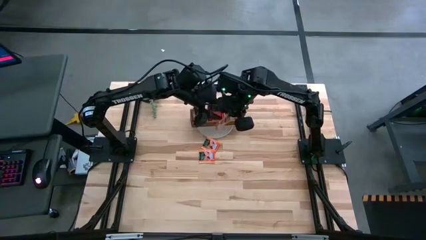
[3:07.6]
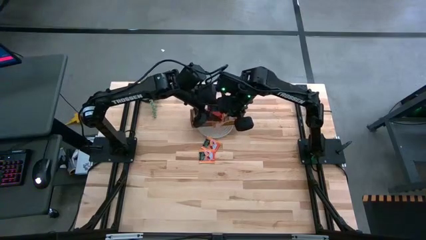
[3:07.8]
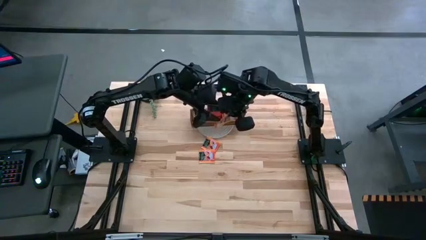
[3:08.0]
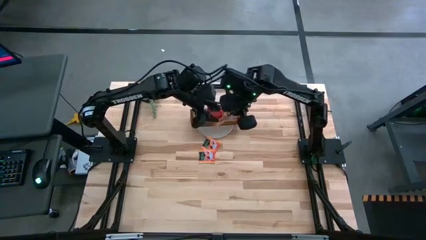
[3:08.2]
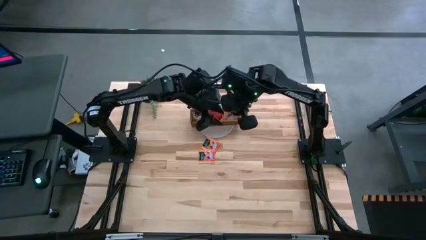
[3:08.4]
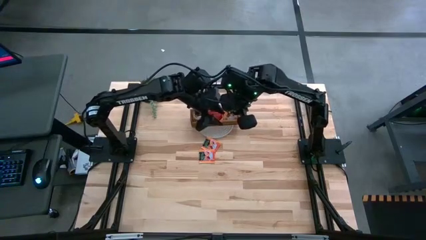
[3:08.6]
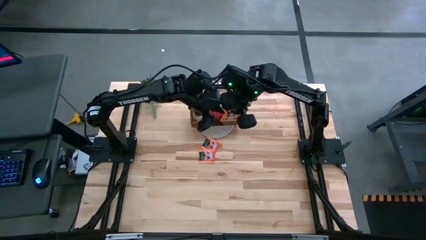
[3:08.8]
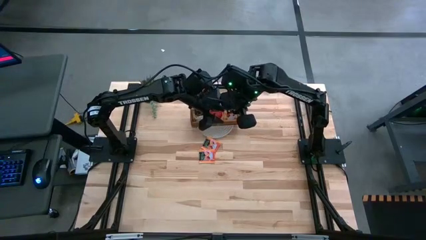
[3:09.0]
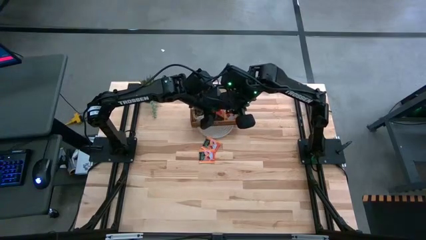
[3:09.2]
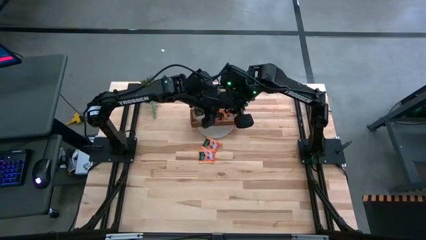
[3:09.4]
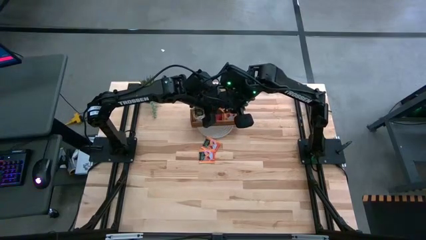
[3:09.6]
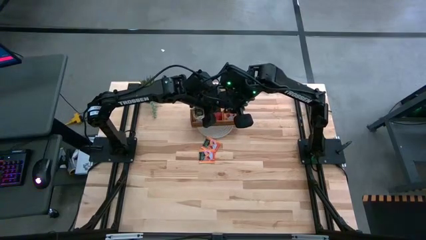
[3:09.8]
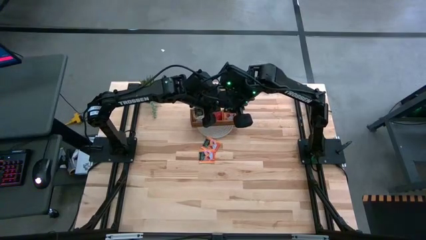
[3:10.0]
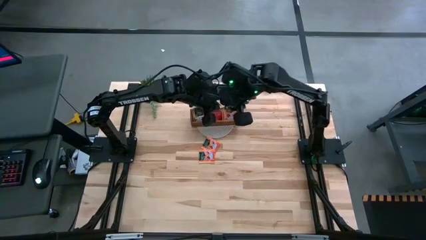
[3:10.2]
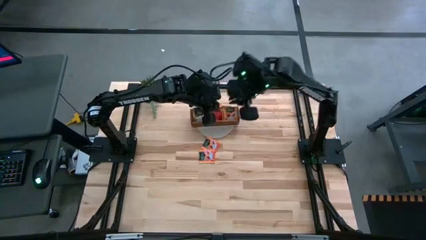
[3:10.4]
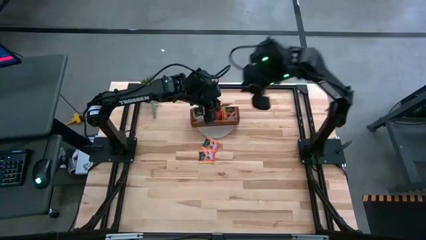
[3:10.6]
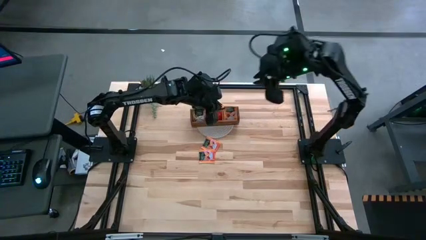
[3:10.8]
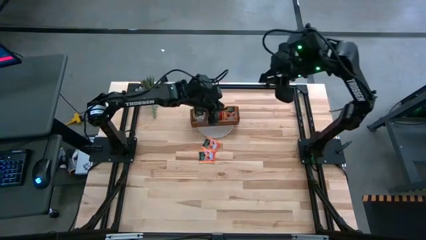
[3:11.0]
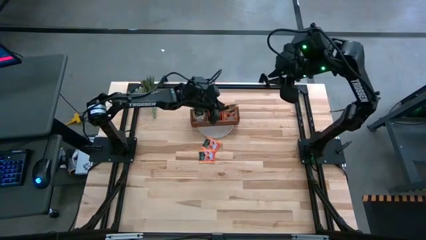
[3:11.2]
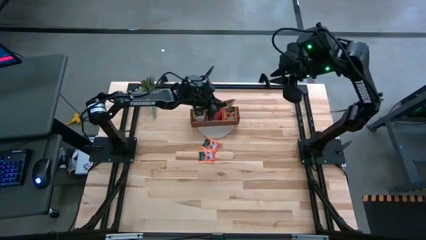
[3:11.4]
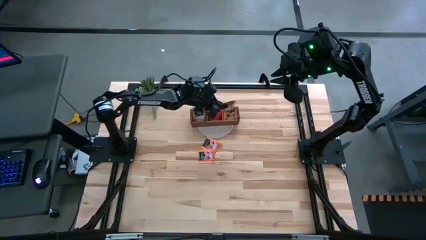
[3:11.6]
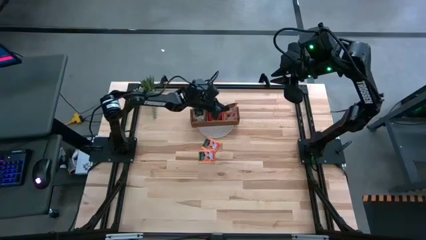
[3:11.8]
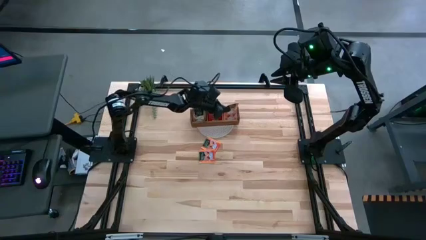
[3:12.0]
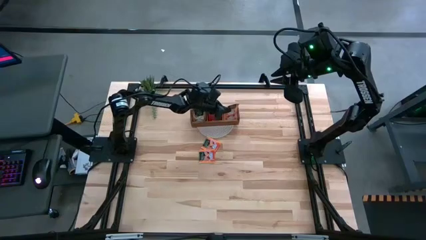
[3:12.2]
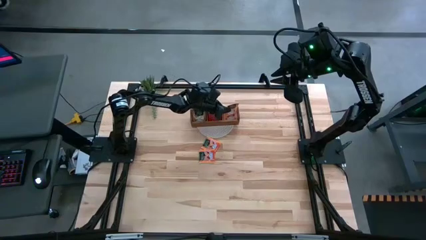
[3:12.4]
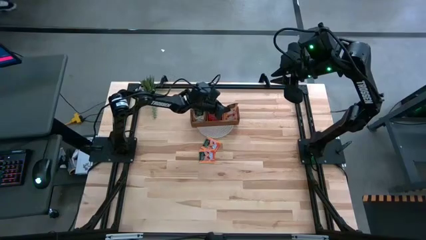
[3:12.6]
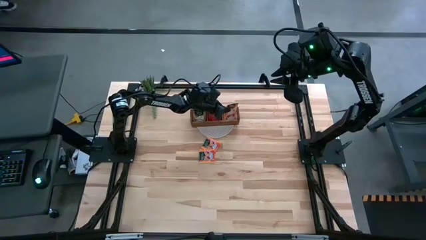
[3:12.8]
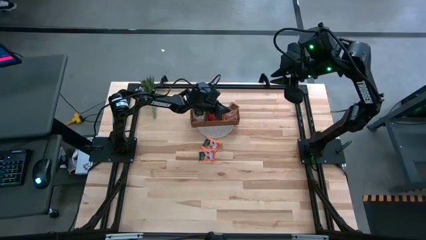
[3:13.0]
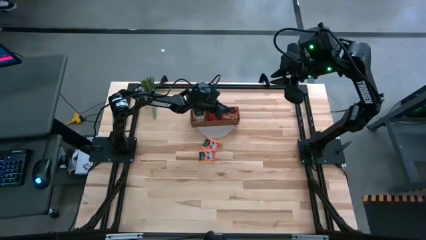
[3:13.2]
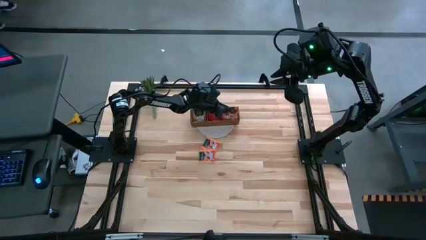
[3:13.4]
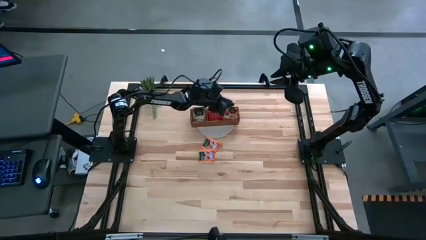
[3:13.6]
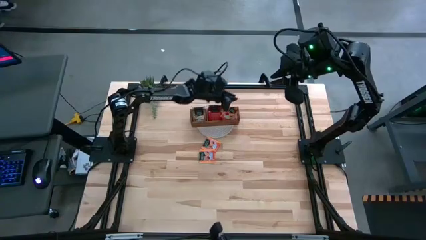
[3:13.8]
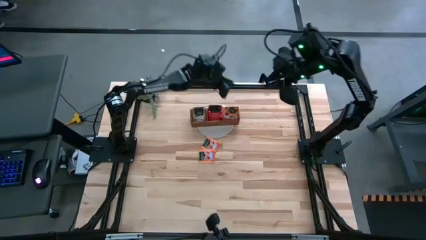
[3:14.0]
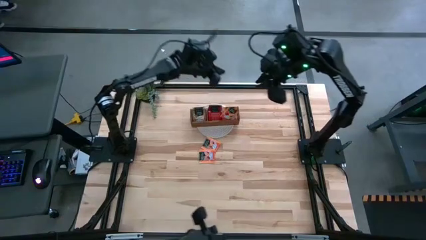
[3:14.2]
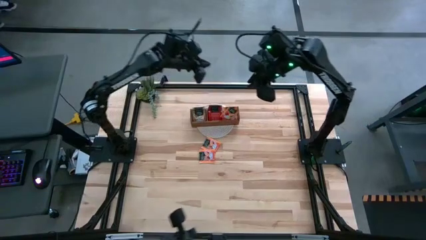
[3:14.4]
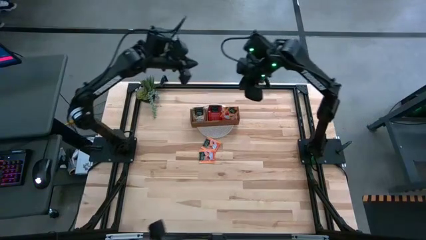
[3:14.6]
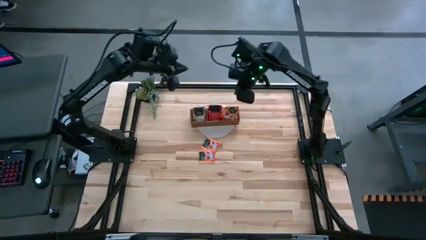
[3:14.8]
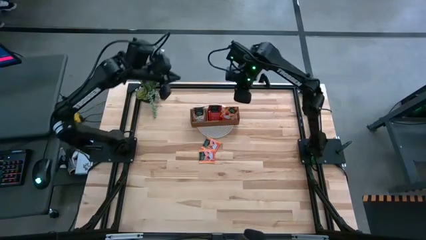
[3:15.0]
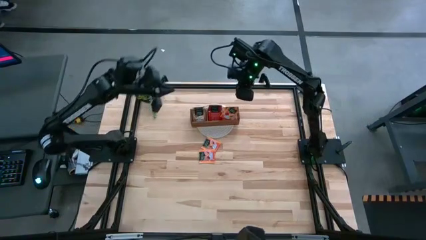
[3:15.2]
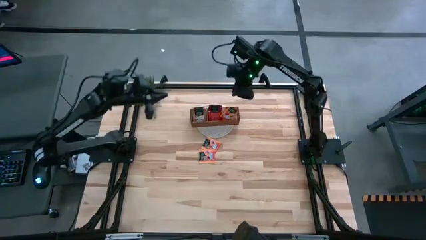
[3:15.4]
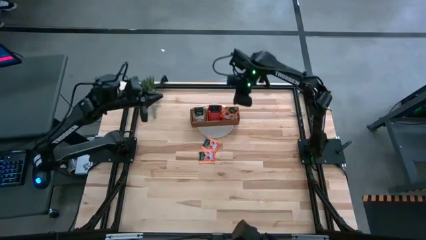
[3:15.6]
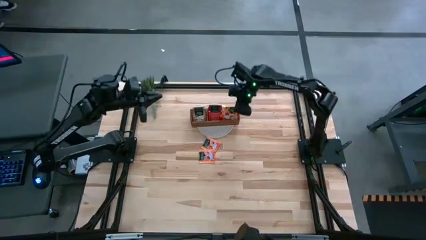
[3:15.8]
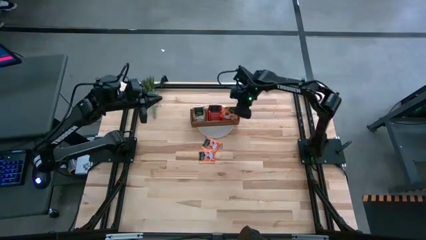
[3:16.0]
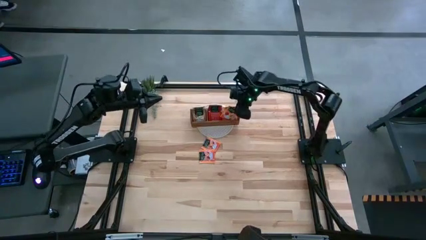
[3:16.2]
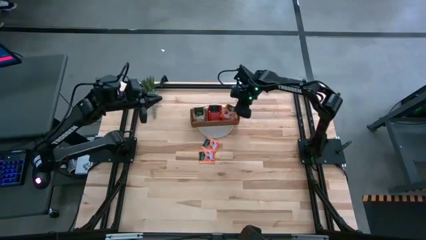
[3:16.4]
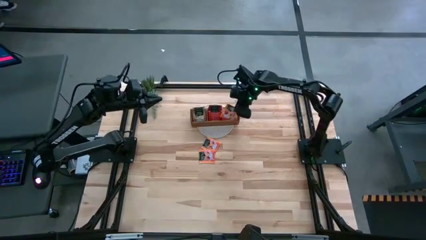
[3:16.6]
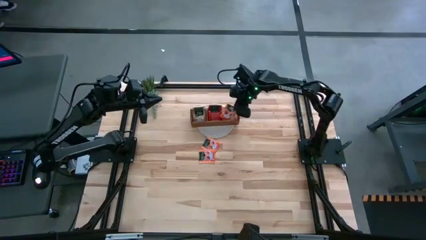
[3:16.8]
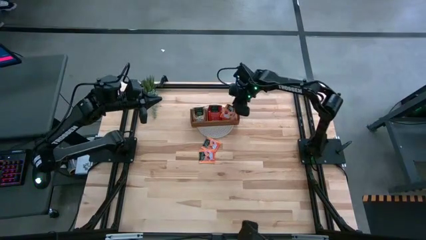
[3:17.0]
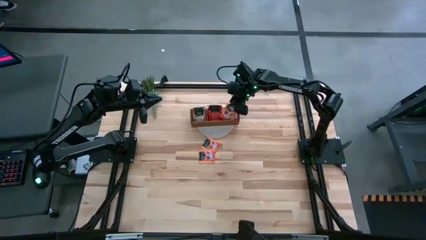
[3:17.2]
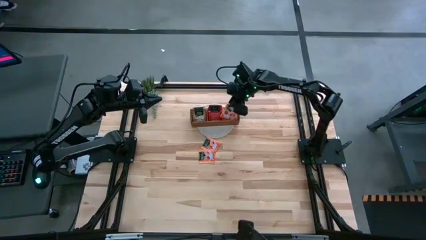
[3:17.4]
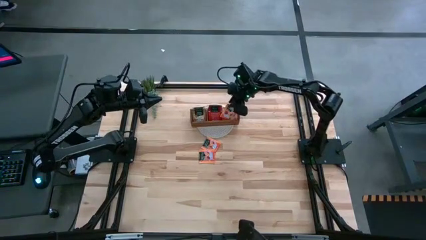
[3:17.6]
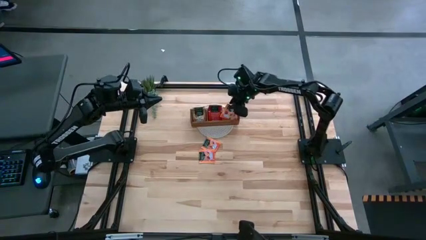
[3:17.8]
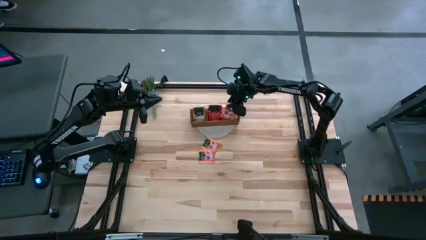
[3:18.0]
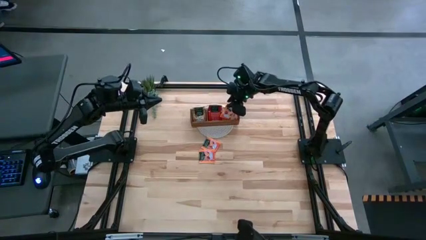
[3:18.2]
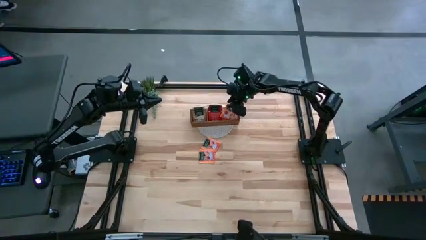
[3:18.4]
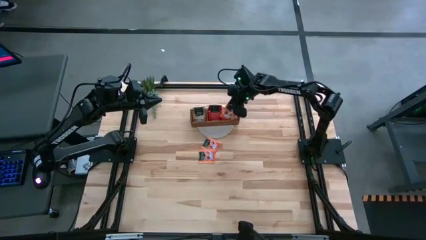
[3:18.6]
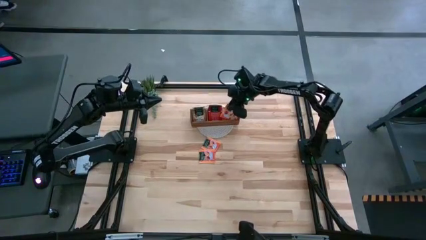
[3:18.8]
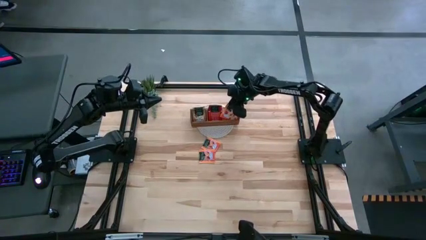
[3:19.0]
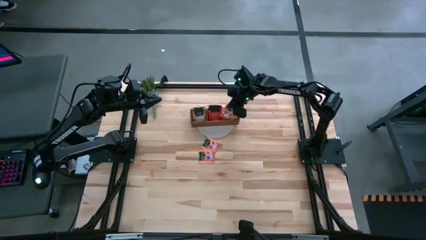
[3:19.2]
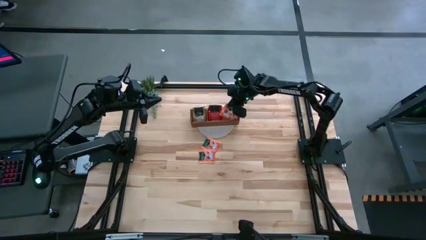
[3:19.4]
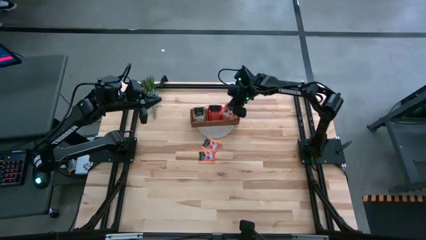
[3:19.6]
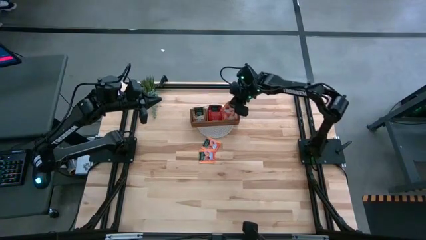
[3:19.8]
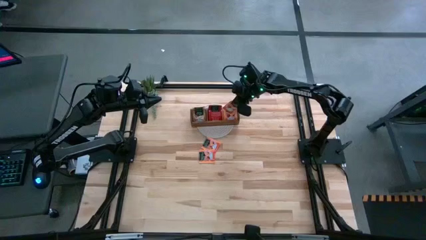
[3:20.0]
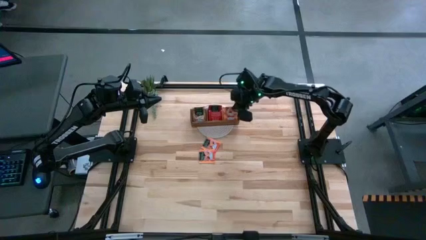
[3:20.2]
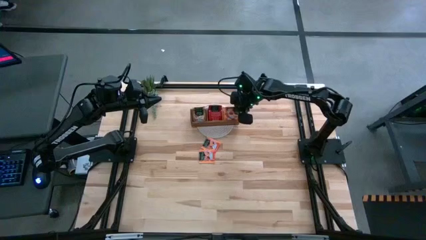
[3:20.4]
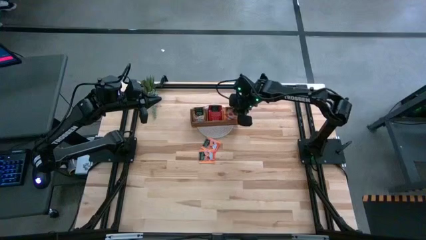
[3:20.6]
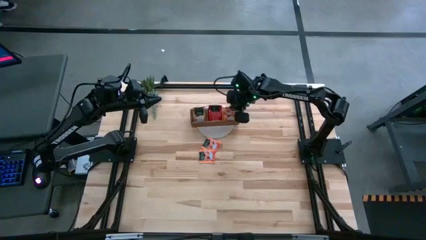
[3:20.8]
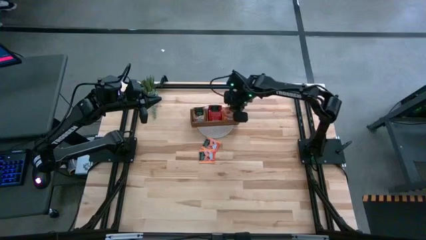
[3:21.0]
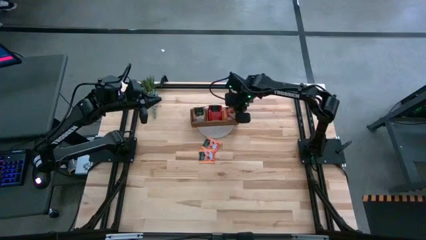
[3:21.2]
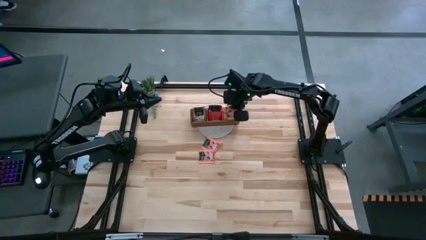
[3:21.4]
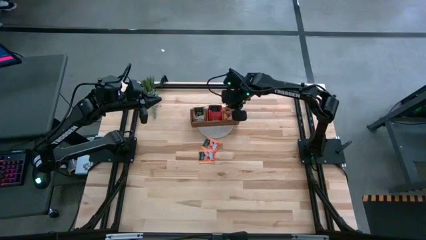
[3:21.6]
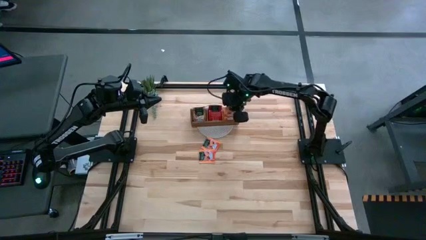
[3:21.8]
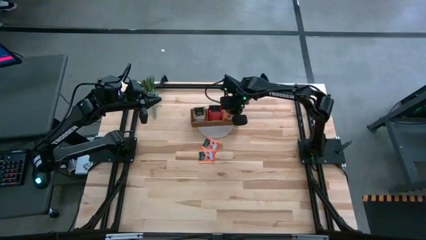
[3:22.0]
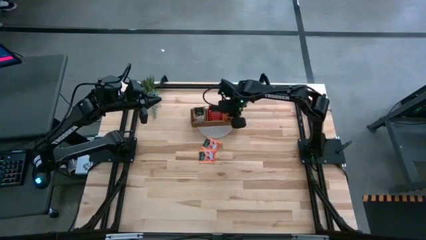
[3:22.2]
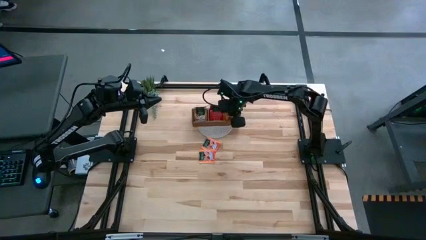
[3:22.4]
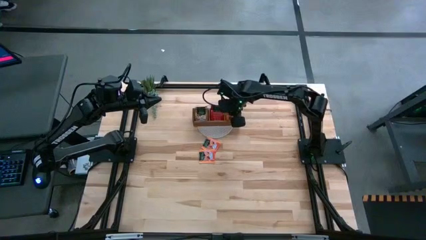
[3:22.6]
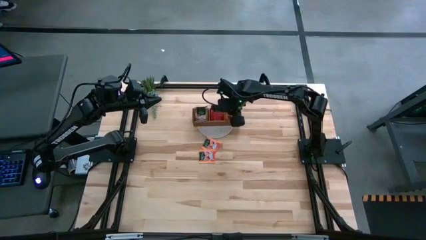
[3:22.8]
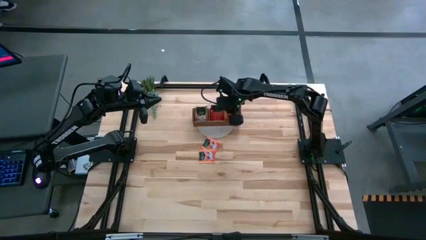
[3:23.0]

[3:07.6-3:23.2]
Task: Pick & Place Tea
Put the orange tea bag in the right section of the wooden organizer

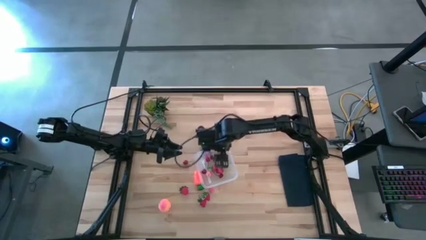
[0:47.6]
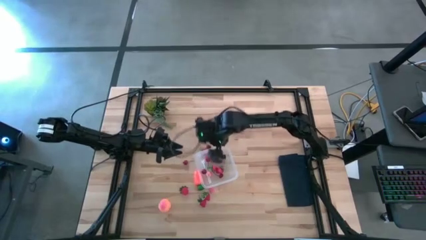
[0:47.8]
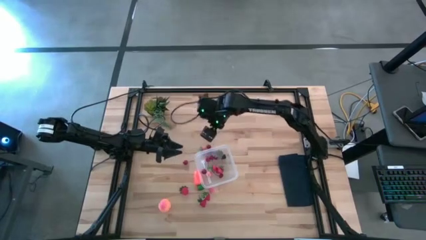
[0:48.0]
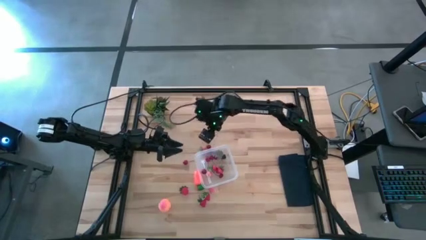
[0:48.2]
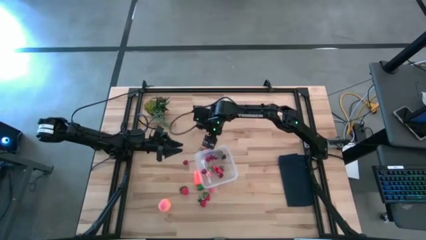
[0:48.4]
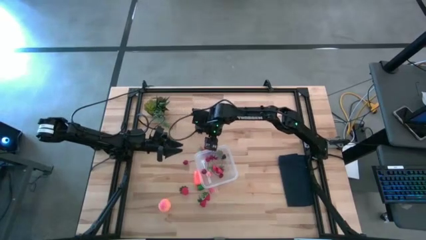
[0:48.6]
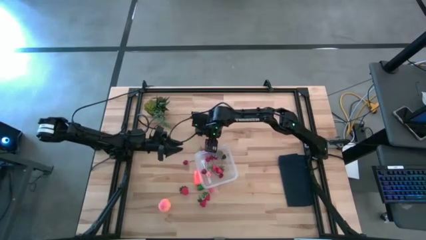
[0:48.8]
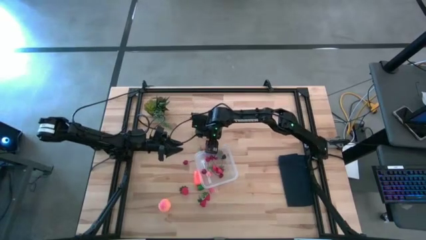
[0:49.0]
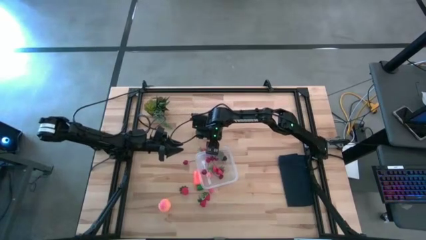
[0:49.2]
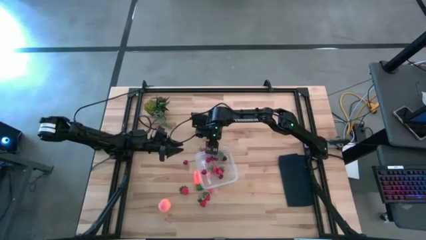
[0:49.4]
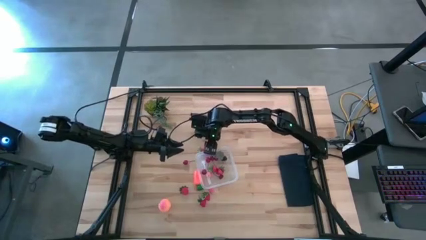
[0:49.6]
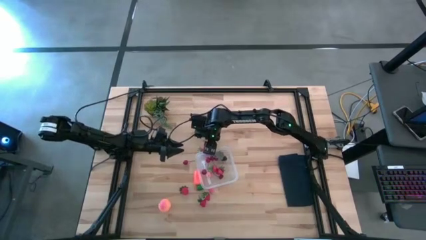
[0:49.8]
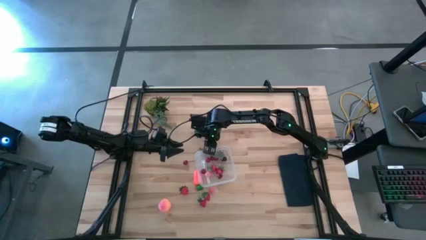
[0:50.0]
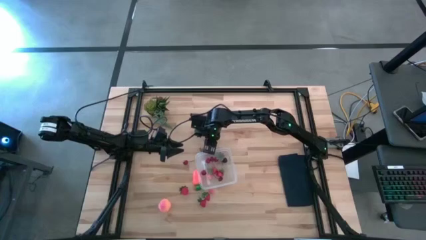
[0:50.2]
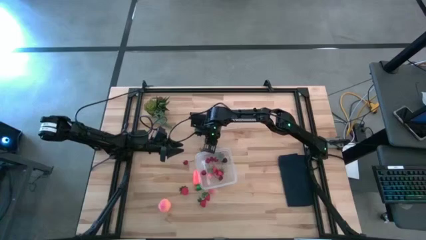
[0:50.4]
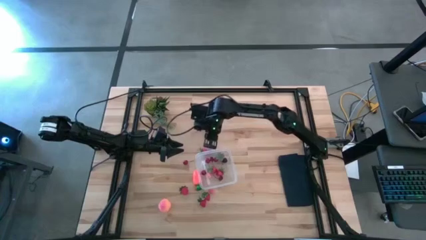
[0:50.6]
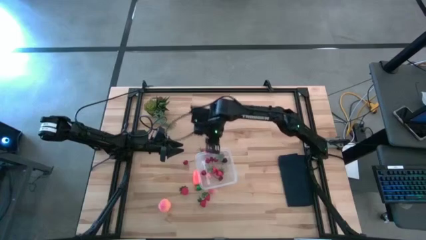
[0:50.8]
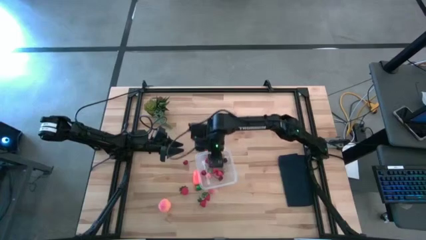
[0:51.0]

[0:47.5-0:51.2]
Task: Pick and placing Produce into tupperware
Put the cherry into the transparent container
